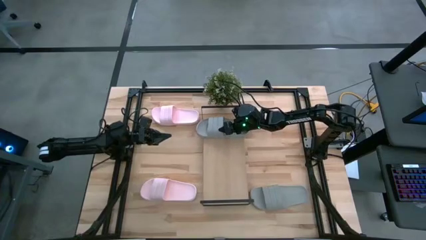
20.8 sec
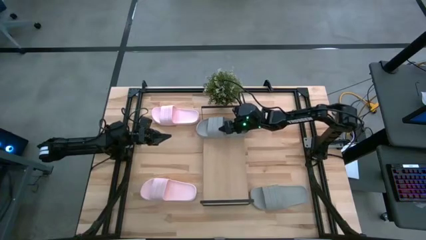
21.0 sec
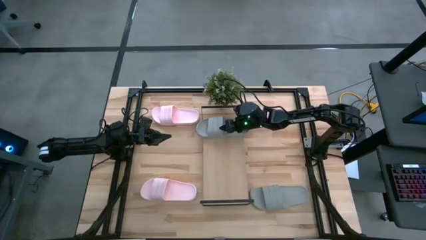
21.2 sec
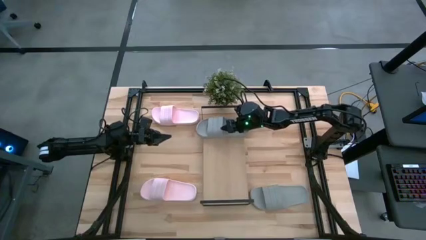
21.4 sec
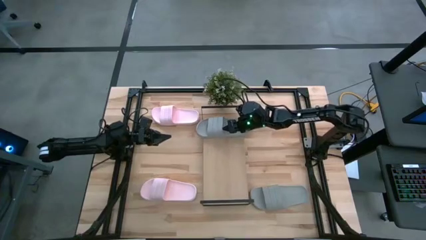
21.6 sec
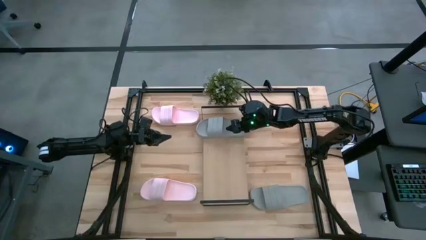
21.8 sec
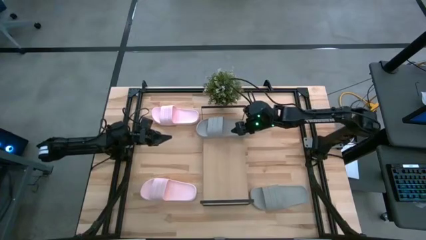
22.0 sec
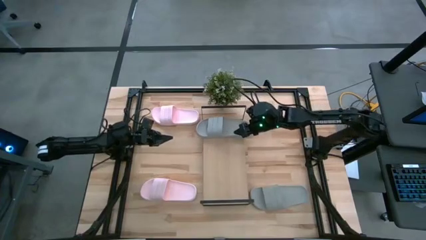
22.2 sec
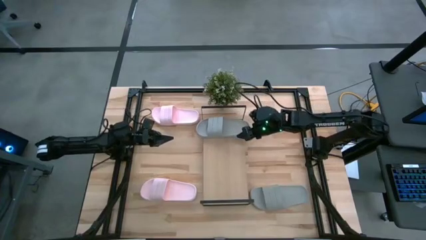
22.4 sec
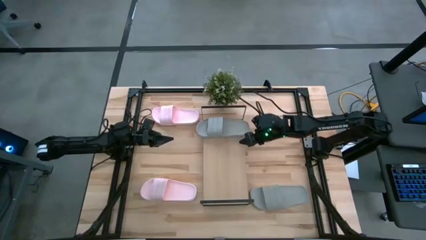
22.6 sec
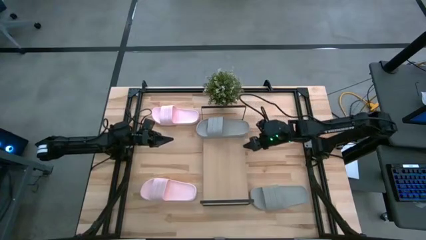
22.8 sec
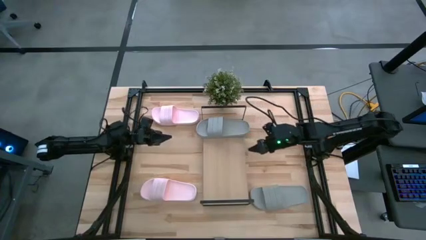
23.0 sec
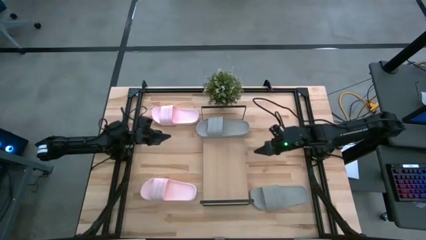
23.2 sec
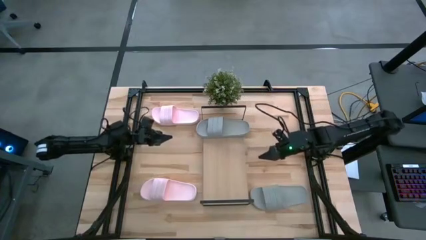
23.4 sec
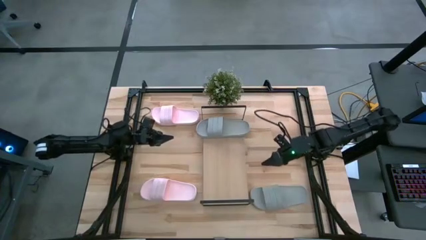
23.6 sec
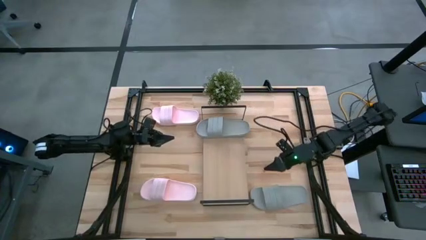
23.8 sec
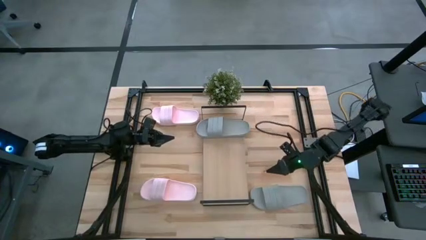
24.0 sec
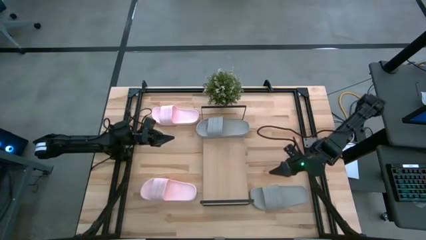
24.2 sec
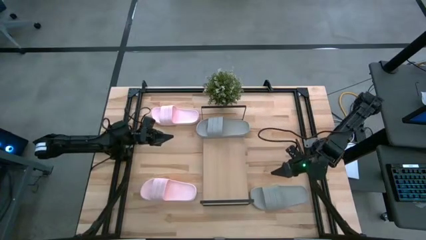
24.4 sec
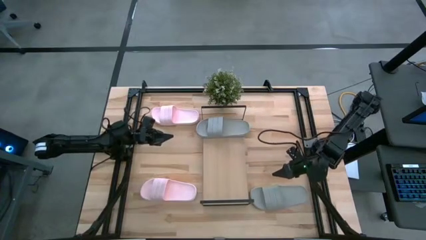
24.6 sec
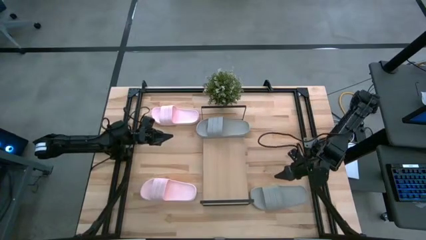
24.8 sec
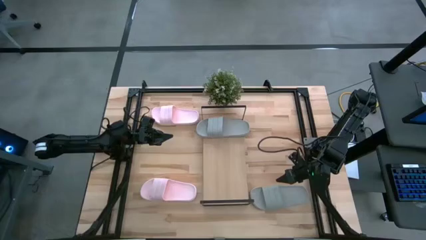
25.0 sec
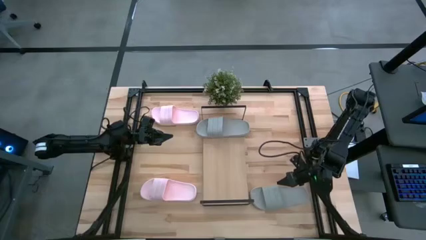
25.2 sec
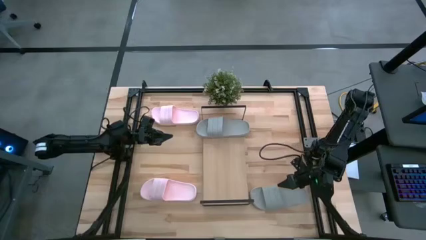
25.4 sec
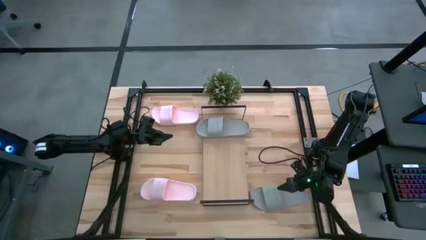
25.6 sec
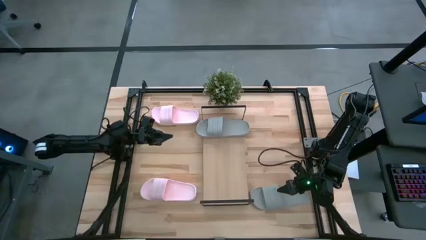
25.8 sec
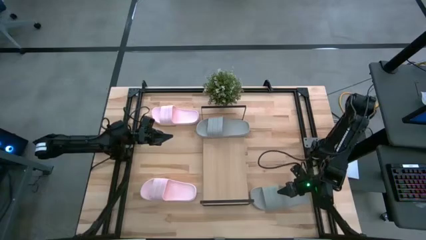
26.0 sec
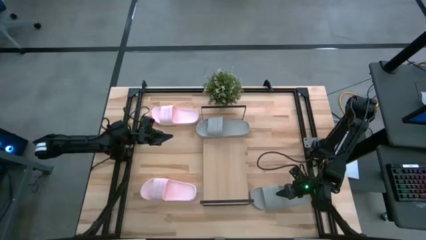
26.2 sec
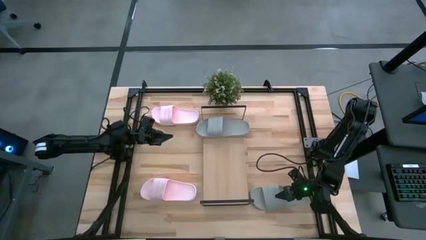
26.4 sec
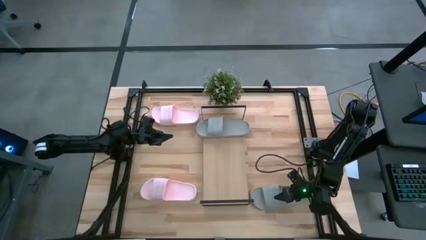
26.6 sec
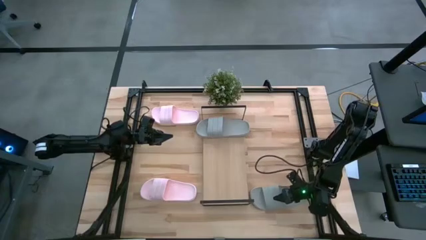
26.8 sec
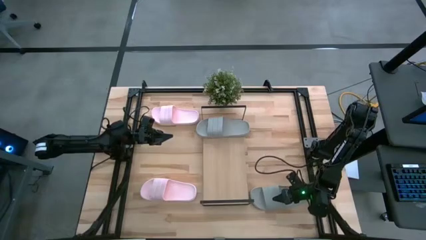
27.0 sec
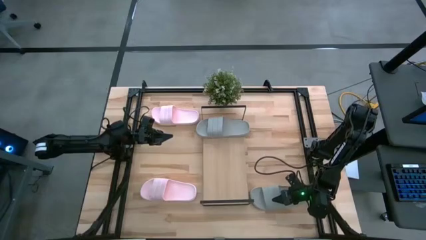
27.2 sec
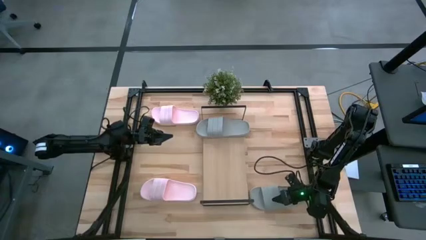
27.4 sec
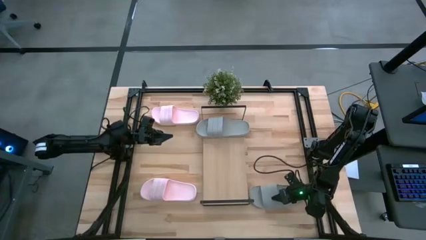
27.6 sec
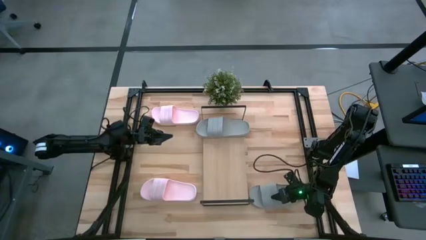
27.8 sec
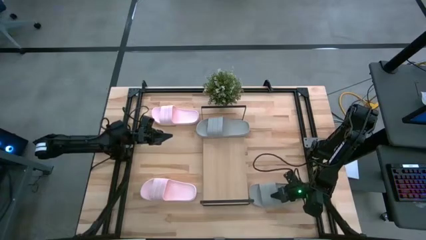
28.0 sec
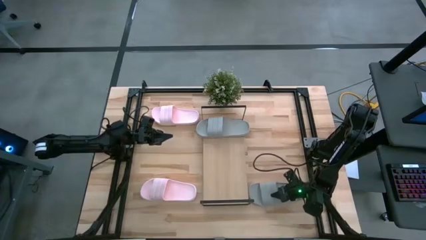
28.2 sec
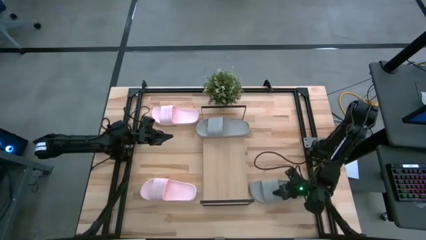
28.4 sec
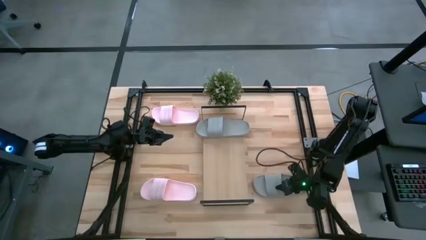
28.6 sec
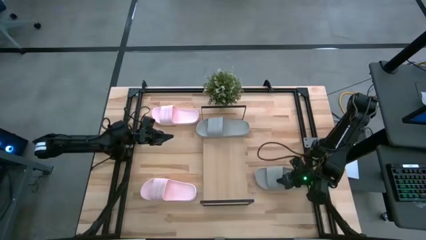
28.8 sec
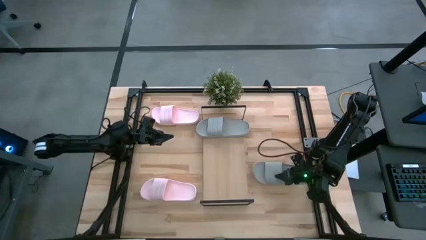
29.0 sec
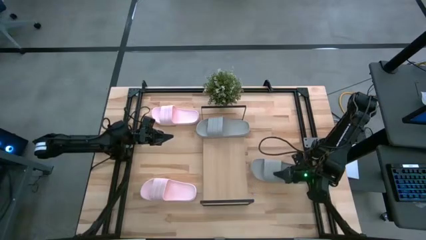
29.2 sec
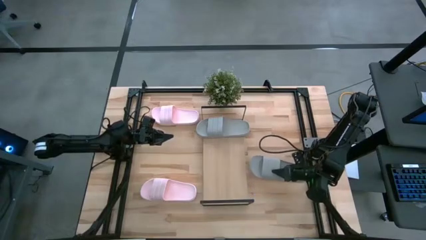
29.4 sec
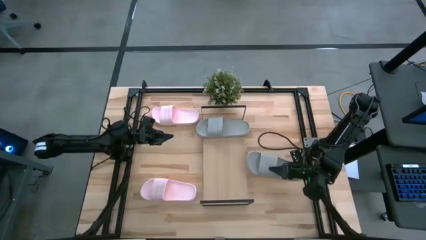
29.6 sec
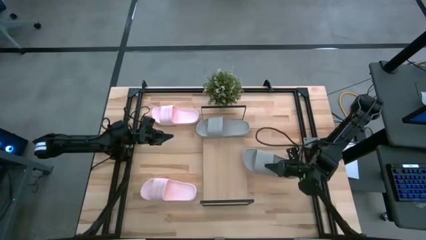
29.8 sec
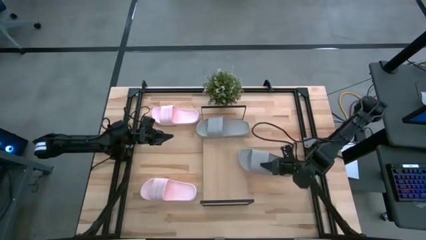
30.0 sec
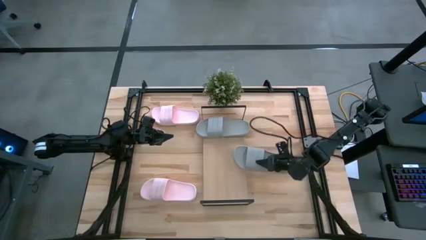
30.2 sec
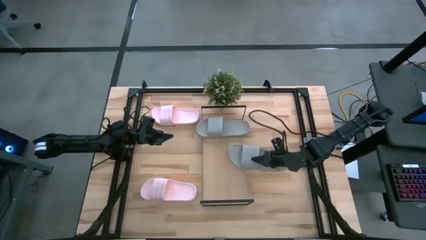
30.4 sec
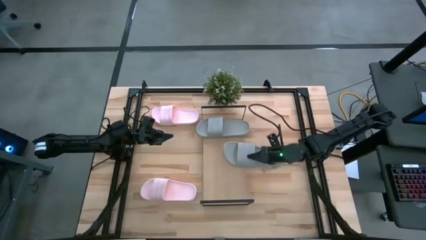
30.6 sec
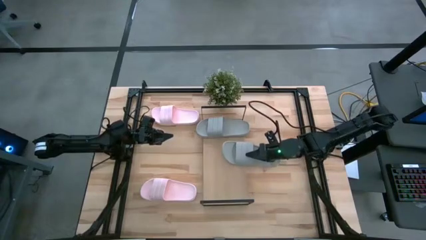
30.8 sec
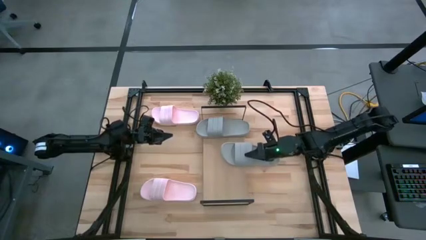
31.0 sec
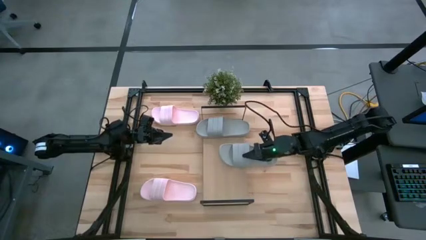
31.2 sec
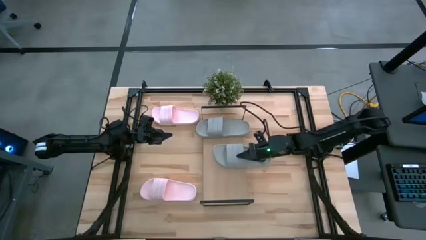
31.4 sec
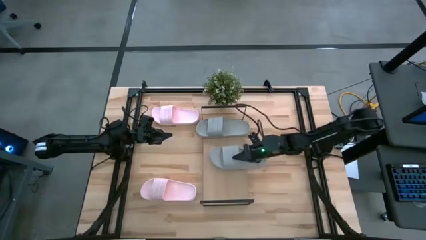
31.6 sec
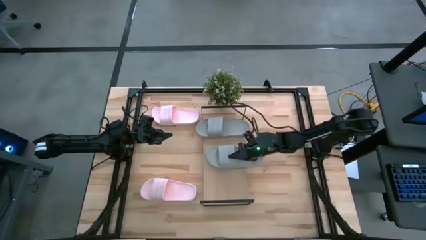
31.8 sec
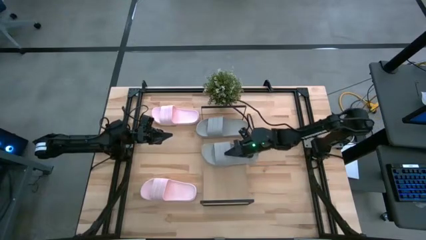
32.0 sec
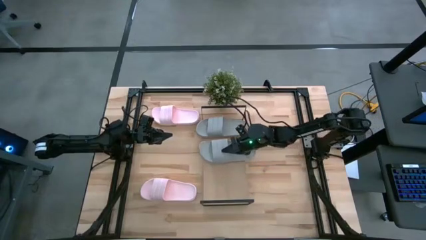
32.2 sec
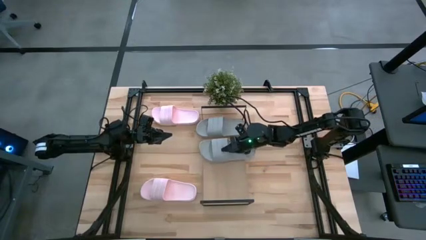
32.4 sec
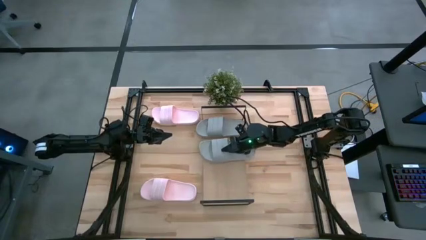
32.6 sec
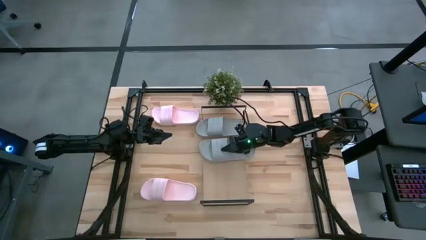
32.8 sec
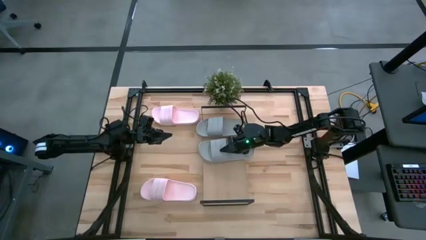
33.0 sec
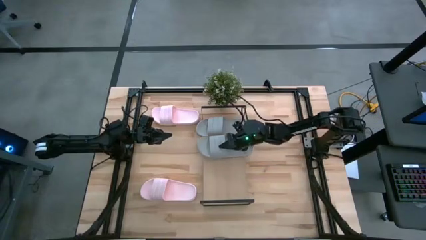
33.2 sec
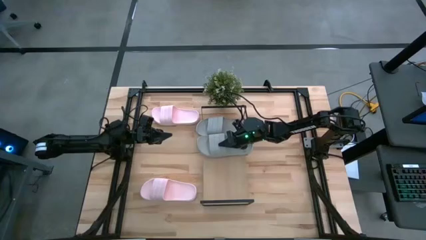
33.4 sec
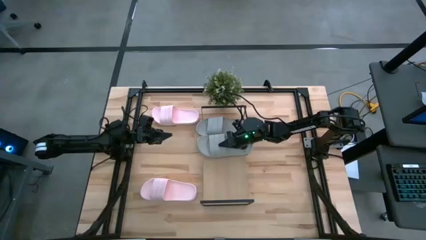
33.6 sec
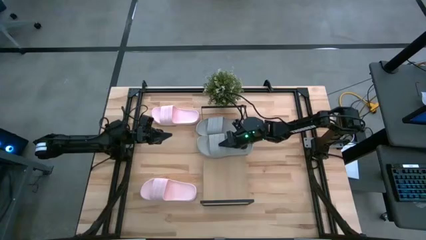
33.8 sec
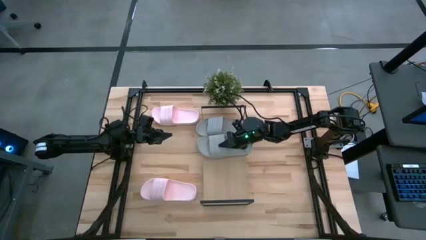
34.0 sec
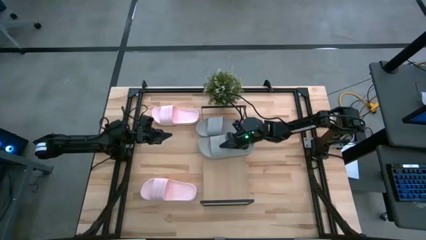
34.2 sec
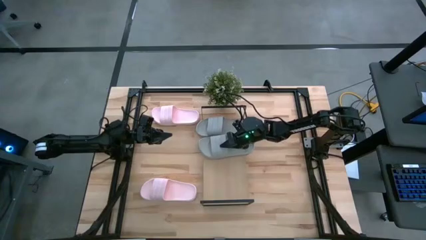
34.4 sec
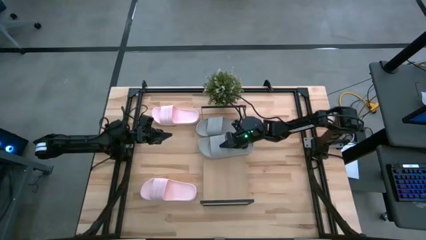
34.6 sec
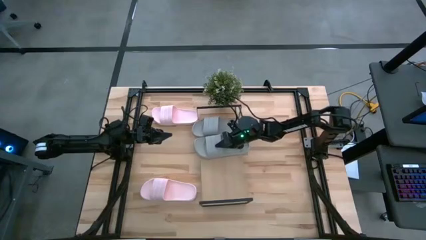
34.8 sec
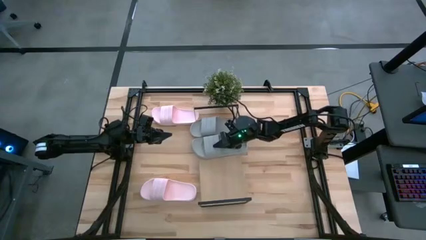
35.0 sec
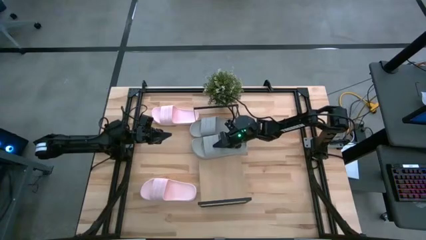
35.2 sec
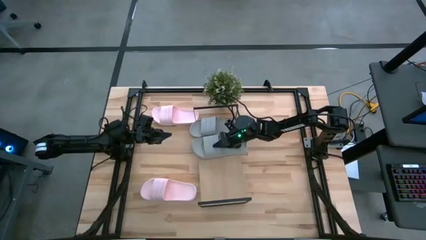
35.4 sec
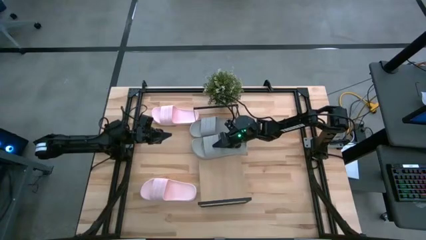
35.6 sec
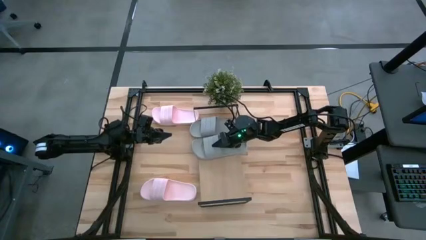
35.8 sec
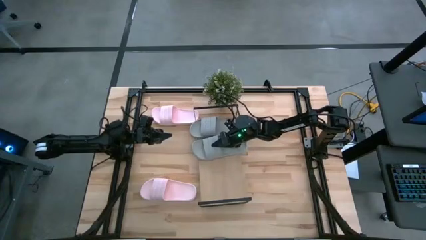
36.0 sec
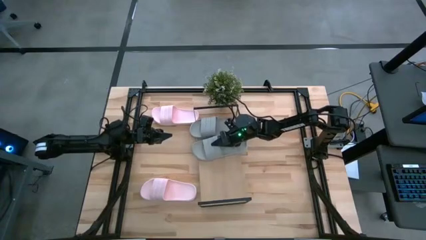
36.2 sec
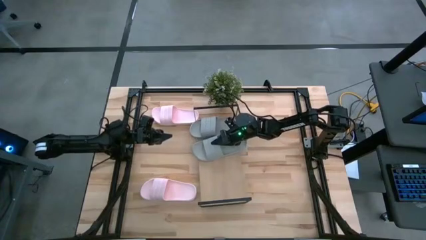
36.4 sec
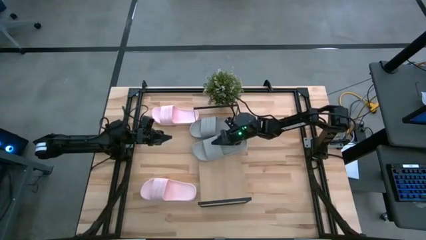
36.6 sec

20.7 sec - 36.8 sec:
Task: Pick and place slides into the shelf
Put the gray slide on the shelf

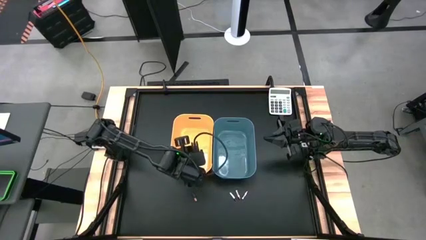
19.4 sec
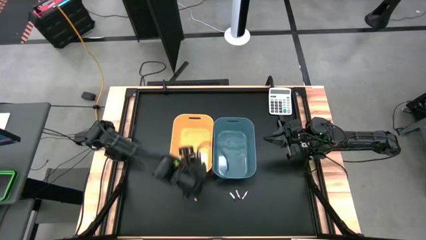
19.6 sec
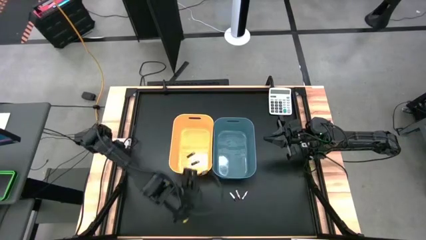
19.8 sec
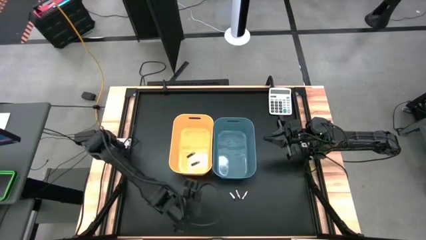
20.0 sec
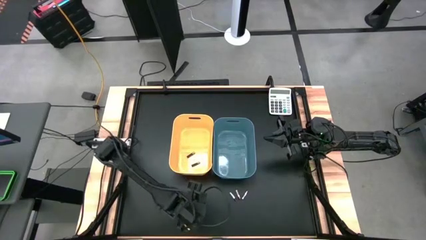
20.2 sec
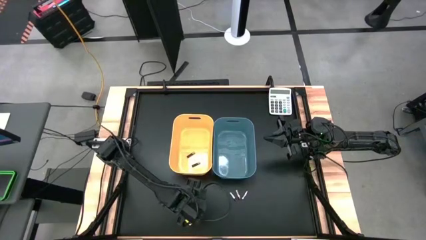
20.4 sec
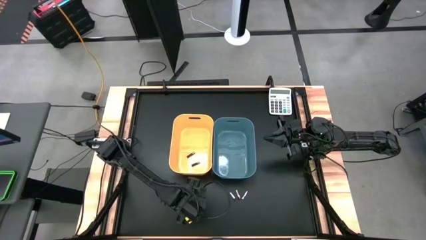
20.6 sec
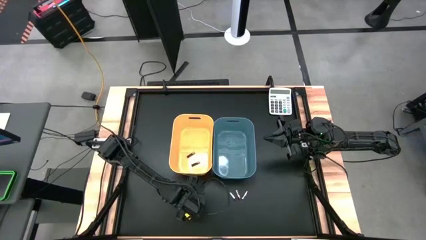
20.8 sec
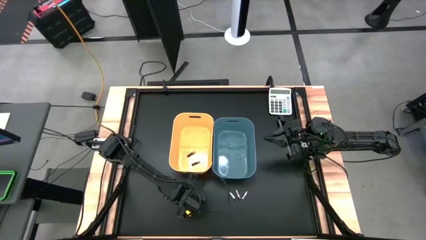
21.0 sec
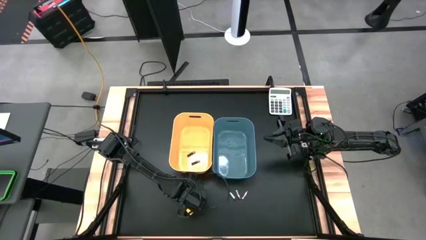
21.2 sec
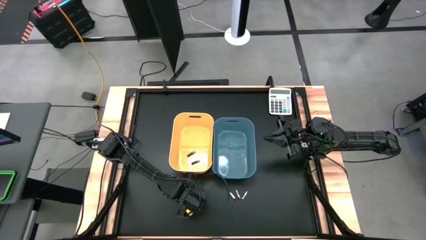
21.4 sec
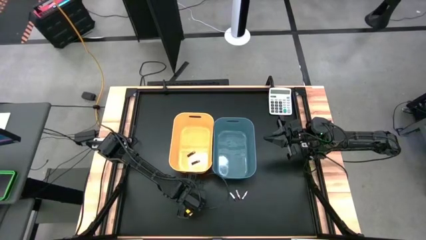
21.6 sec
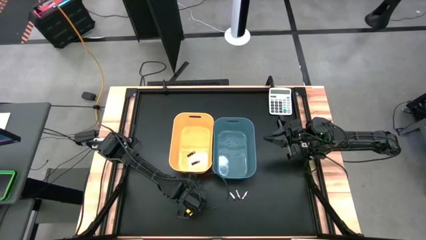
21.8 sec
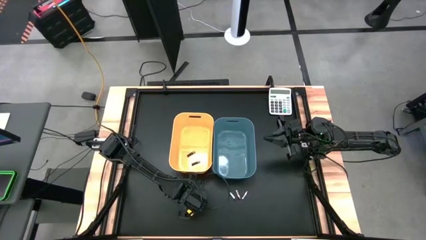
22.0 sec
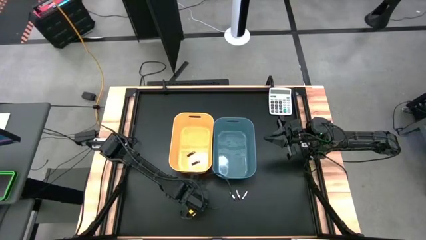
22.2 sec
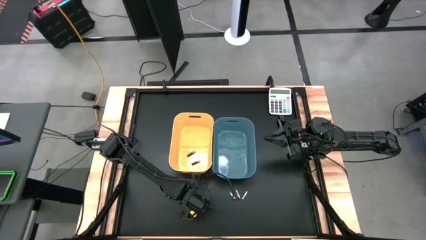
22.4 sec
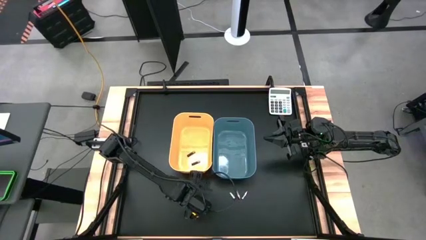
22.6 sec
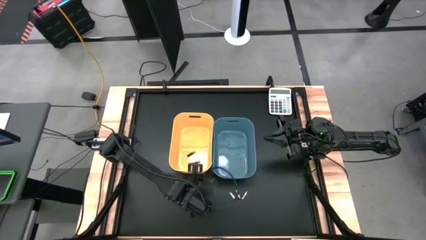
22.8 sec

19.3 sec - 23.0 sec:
Task: Sort batteries
Put the black battery into the yellow bin
